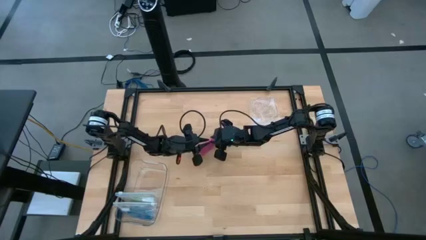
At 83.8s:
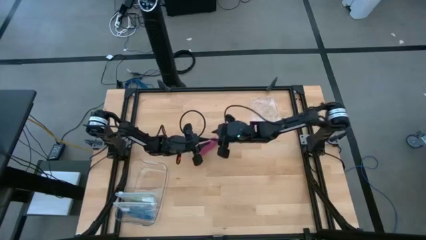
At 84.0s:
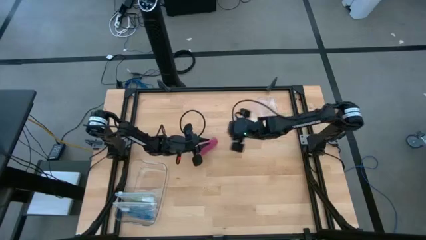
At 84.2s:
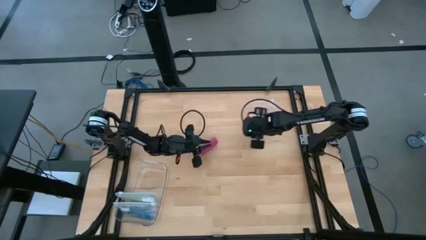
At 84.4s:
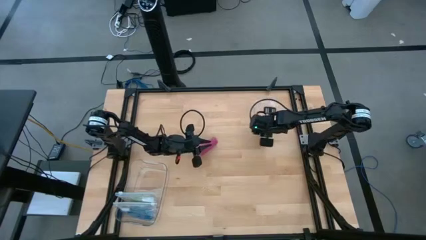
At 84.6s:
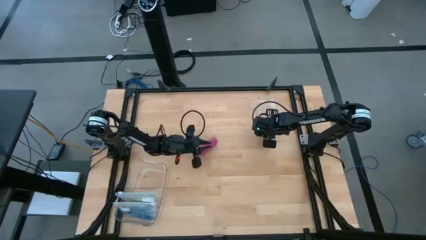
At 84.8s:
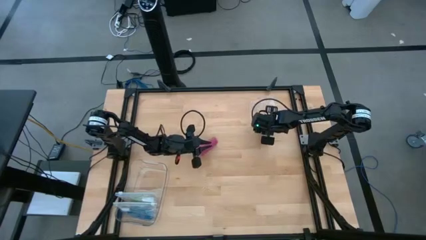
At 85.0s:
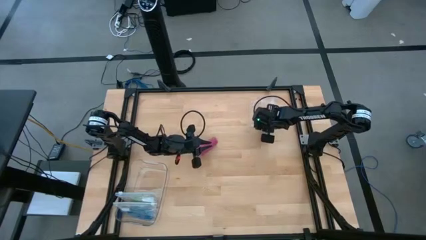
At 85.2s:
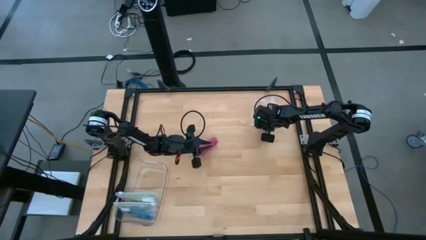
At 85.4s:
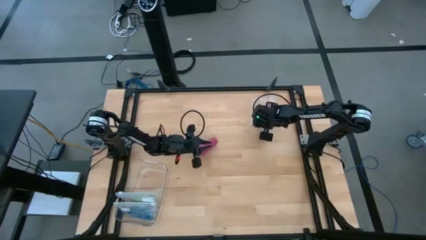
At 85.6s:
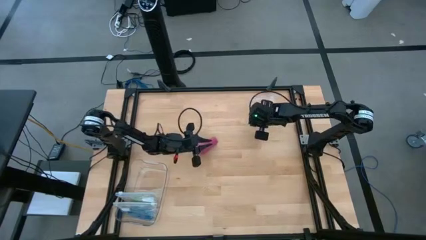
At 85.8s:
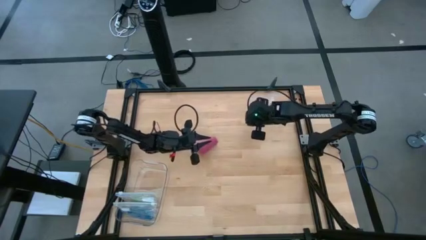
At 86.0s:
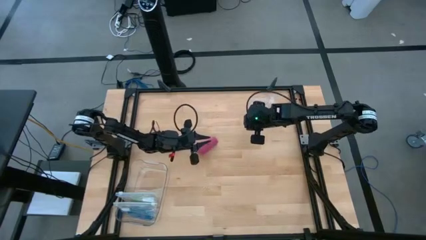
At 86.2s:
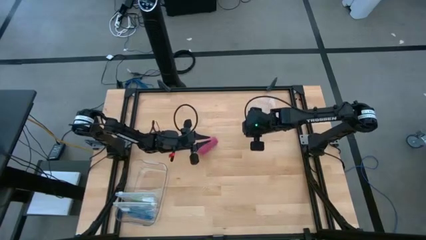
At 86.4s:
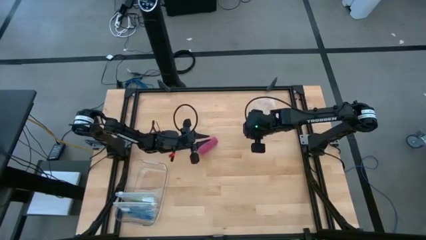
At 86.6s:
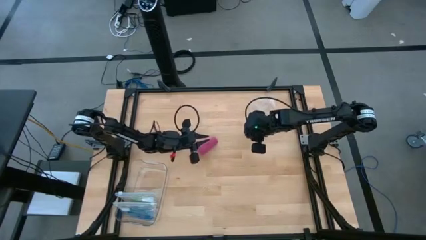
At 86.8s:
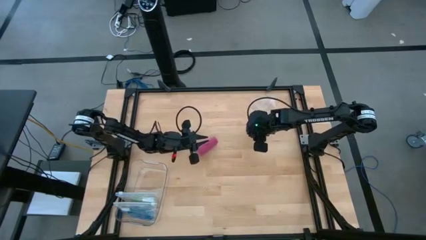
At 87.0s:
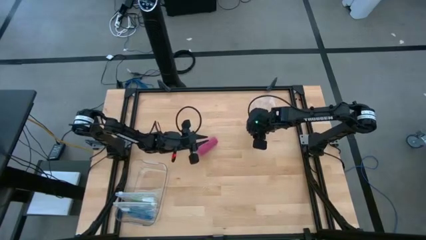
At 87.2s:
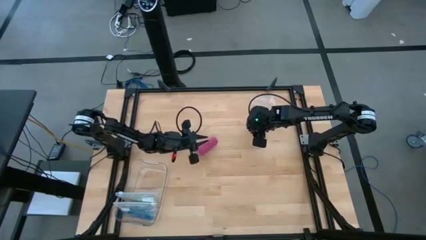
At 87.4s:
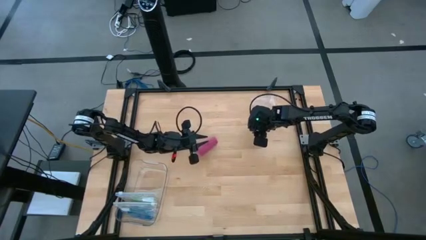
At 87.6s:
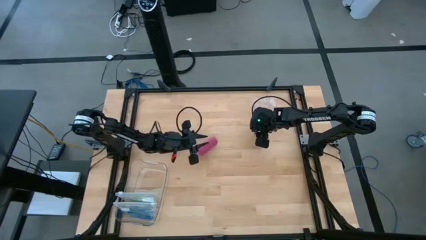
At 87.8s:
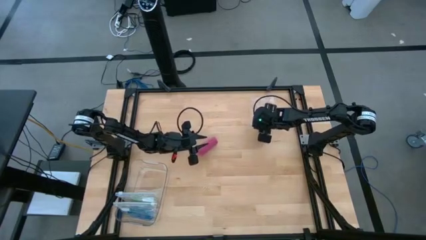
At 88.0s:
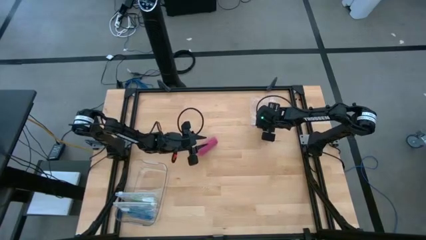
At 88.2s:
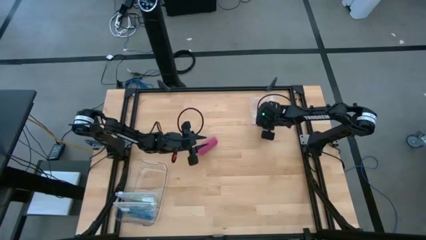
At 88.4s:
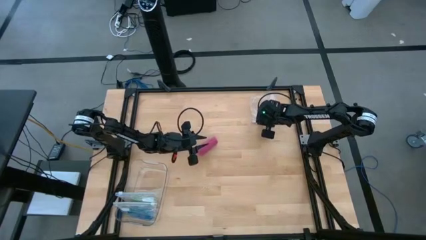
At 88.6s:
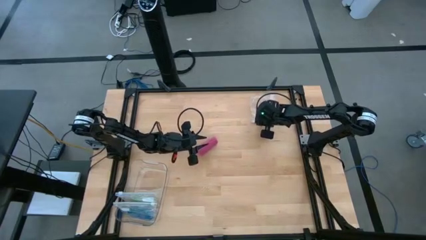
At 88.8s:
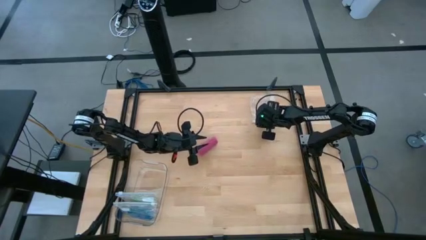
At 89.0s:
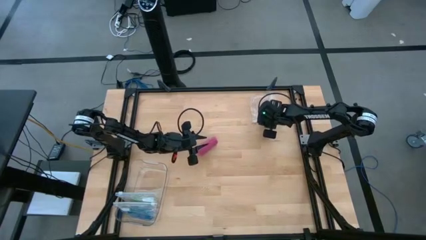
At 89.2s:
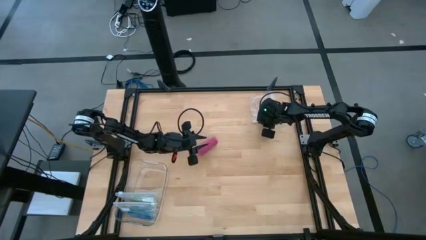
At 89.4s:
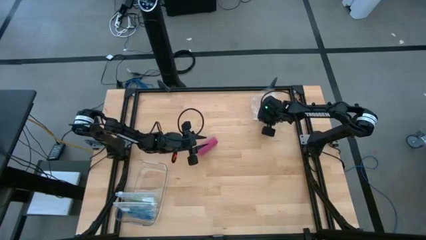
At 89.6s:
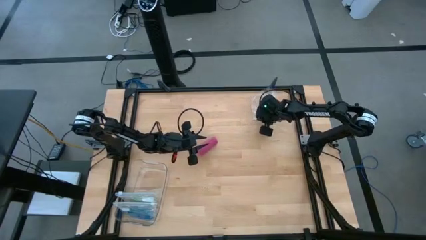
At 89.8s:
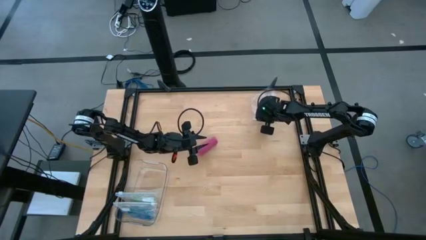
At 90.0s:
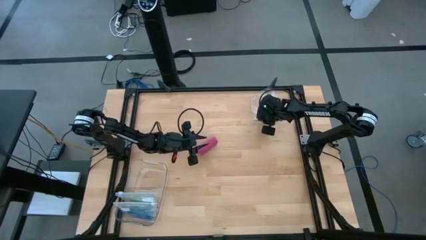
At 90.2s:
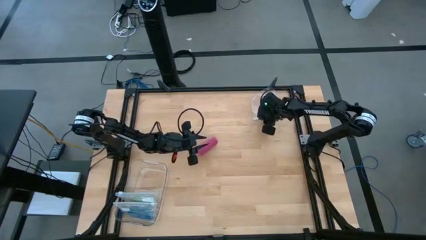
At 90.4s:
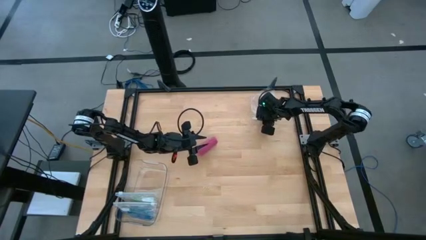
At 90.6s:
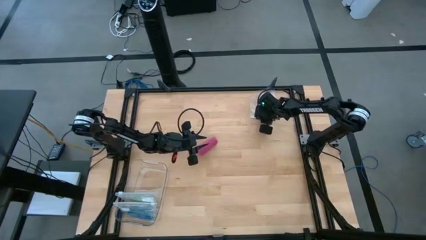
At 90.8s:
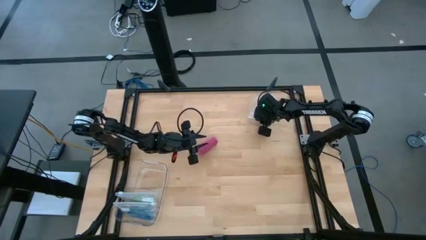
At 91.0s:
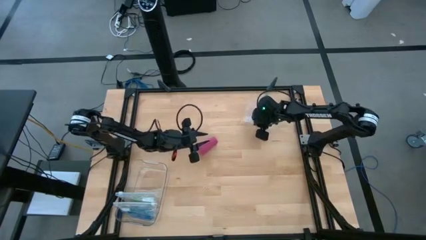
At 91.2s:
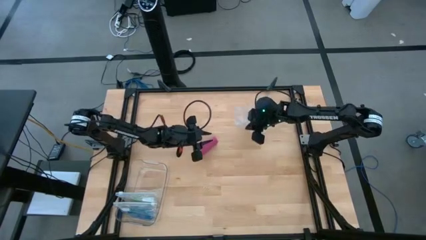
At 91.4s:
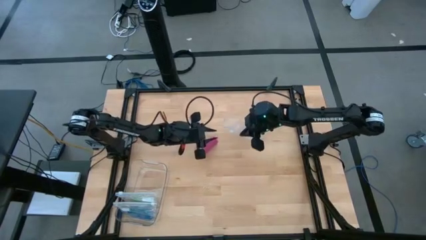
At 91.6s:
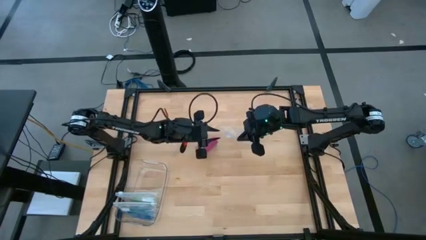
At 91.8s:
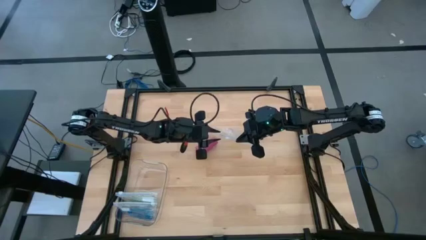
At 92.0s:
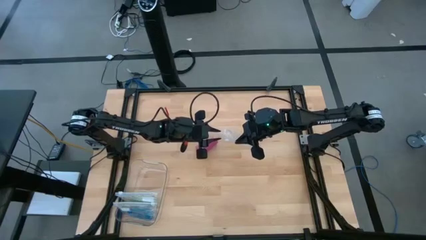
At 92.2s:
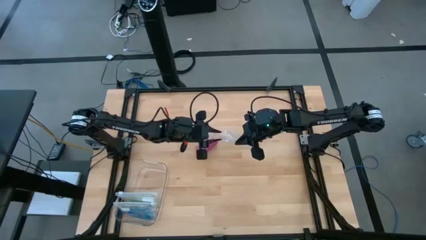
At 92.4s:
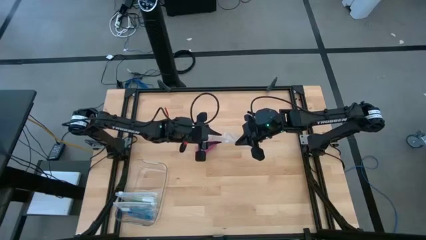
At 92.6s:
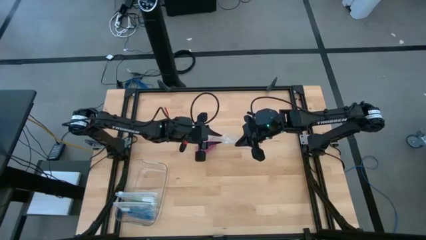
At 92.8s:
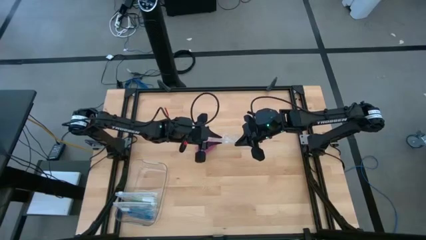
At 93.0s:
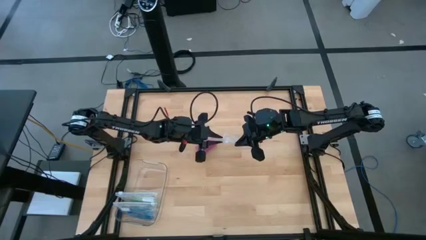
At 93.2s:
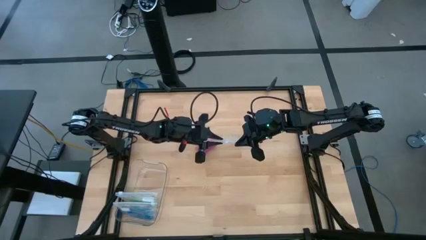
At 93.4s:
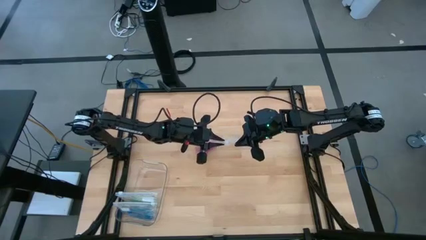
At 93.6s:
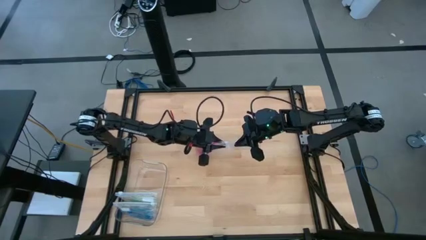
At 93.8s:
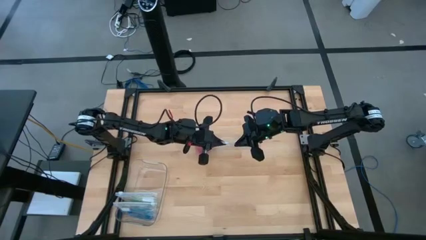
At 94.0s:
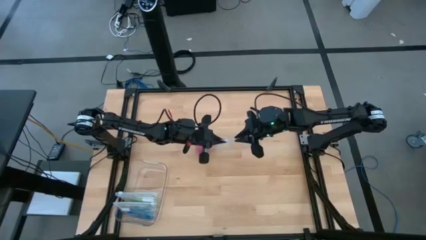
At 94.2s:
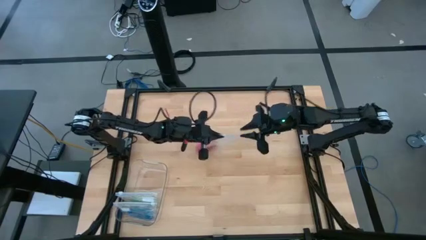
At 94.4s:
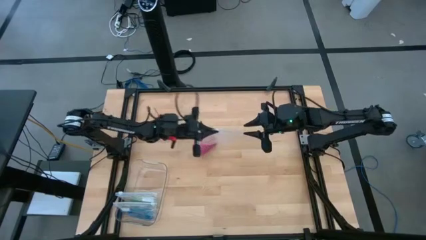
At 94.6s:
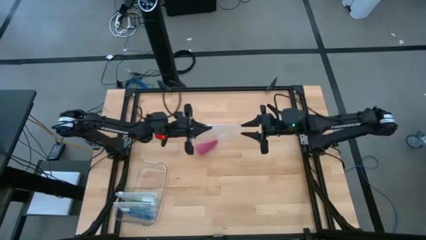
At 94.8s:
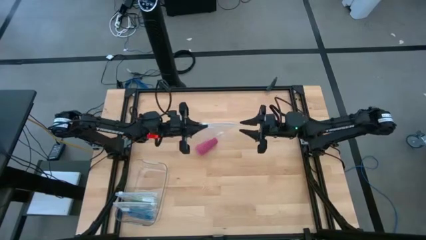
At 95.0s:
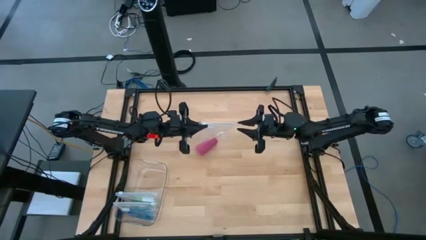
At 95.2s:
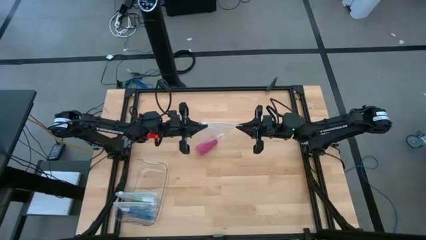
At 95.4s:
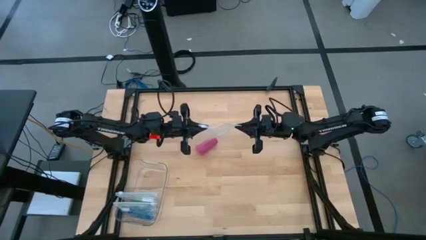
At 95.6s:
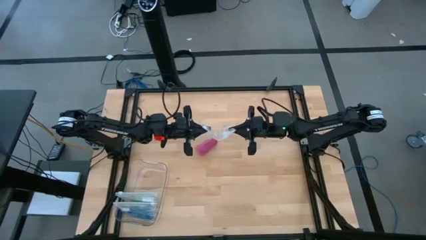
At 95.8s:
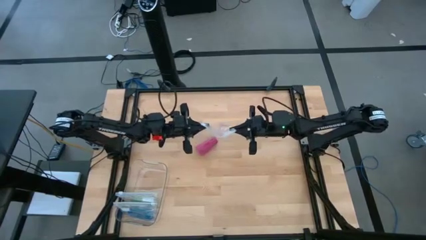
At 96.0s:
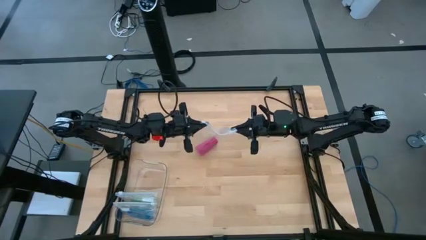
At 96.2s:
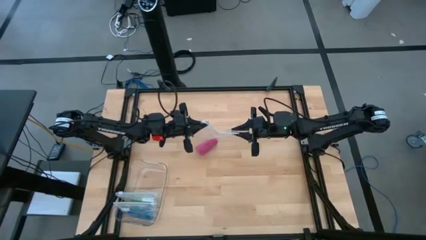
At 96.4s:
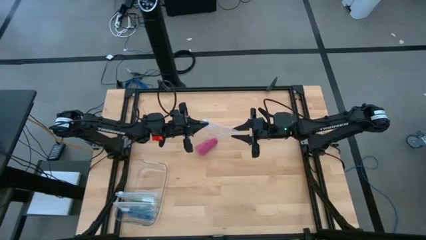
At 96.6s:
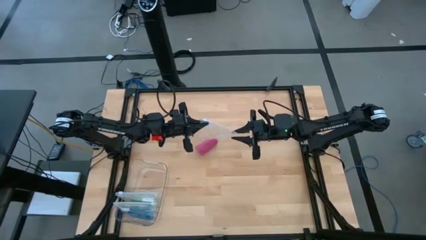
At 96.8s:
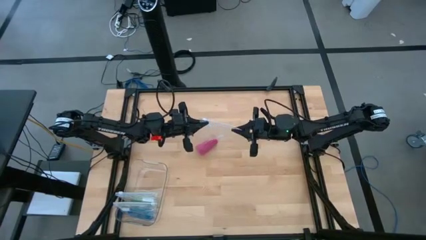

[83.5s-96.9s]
Task: Roll bandage
Put the rolled pink bandage into the transparent zip bag

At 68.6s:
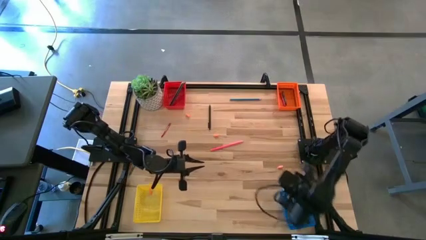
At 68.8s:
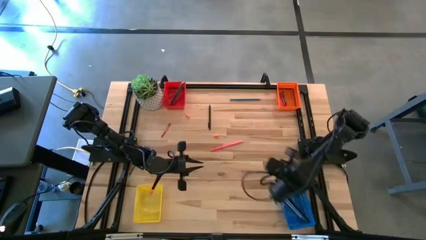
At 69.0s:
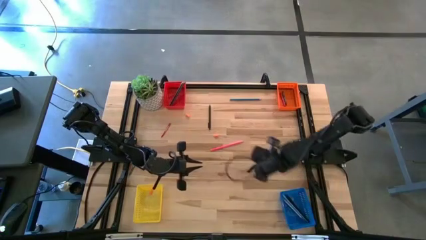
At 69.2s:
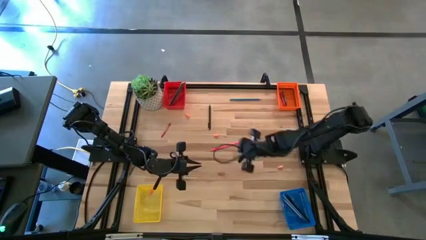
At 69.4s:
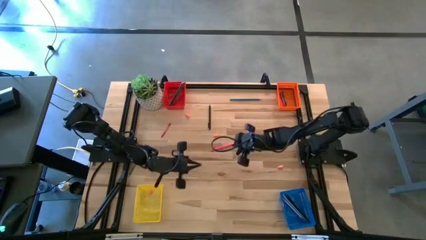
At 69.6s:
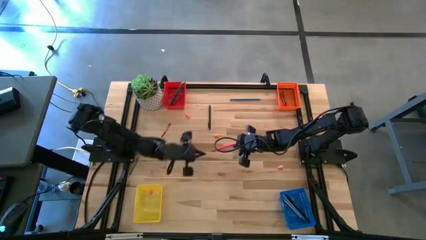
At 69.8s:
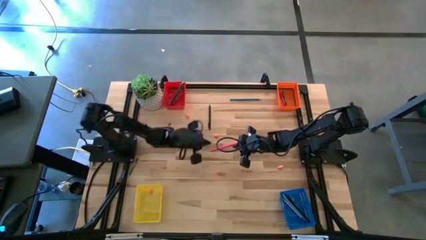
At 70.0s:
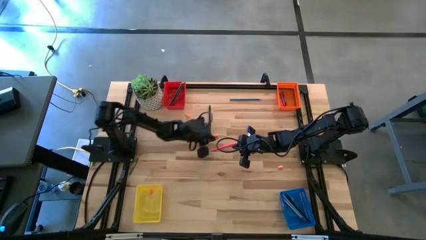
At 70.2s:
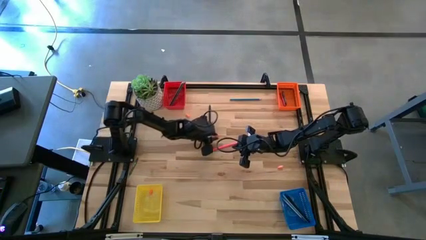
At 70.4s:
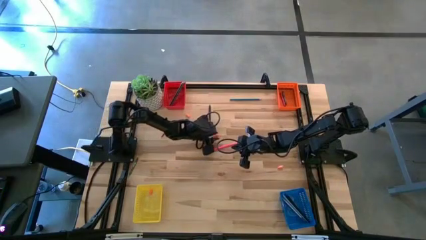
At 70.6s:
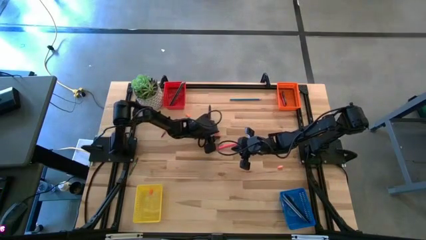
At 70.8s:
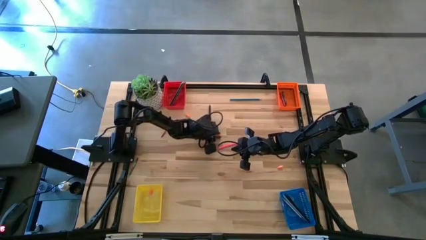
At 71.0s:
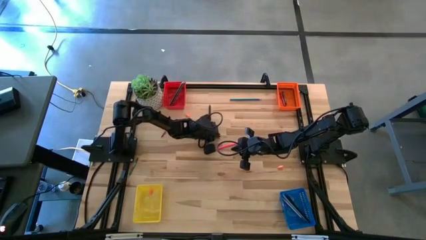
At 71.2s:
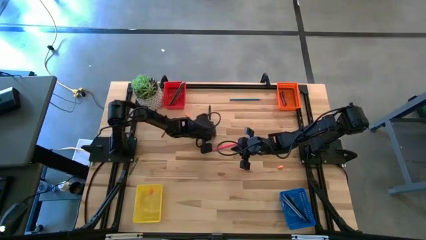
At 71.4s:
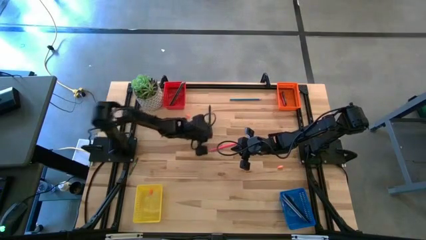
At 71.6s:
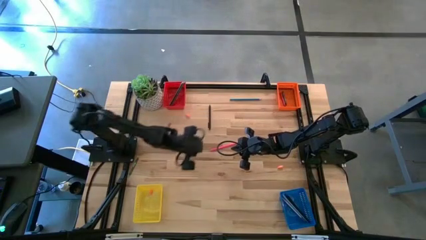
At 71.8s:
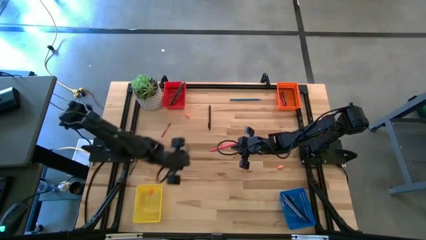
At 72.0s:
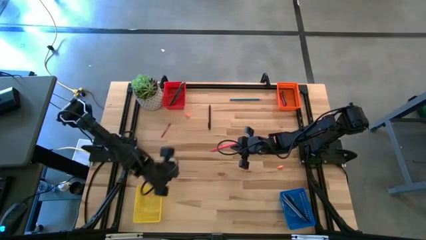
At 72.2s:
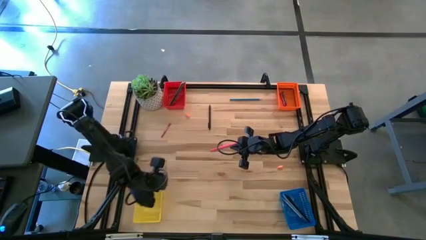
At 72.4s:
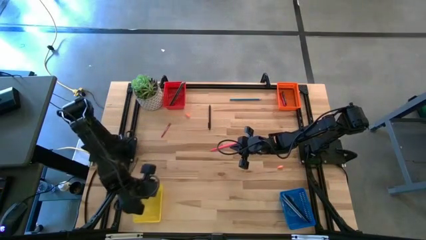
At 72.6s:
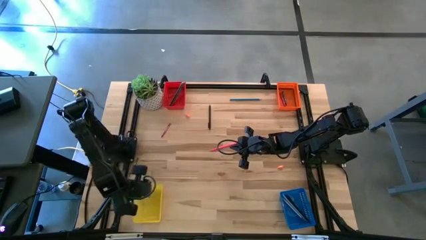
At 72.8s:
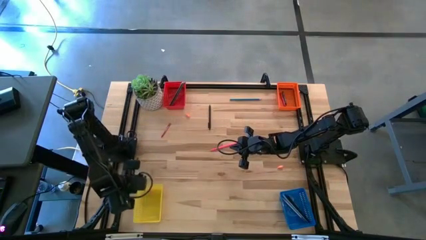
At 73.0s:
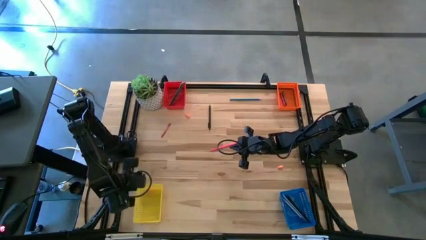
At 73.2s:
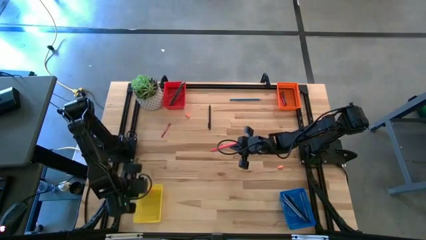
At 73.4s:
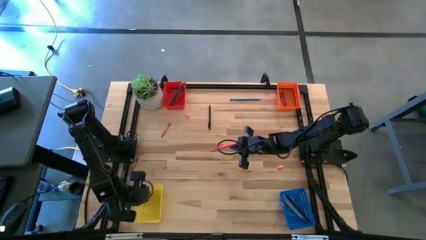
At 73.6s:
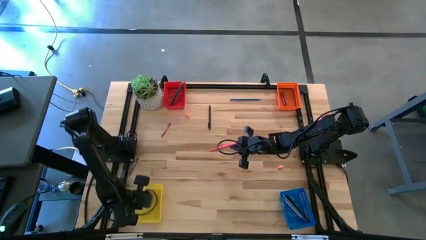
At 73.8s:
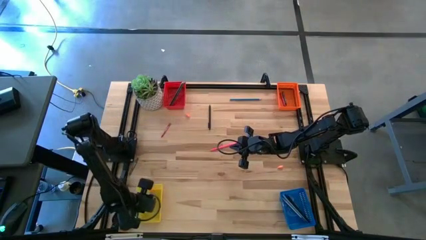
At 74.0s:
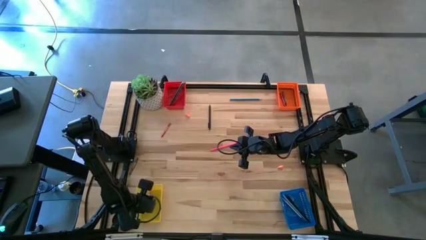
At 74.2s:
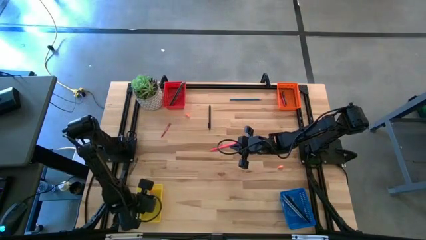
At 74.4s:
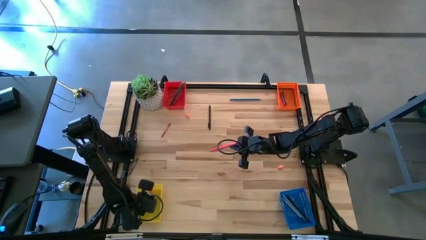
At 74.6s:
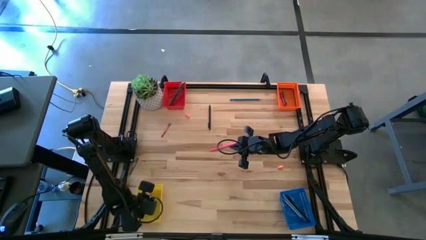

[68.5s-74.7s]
Task: Sort crayons/erasers/pens/pencils in bins
Put the orange pencil eraser cap into the yellow bin
